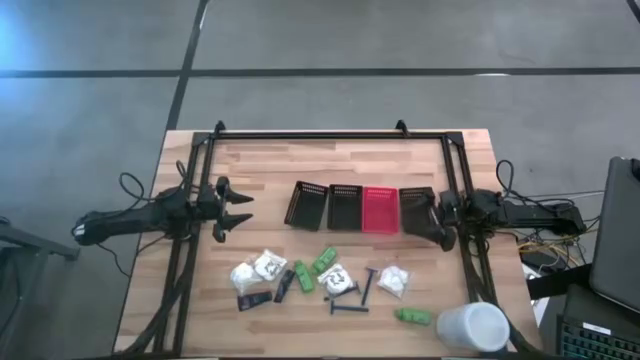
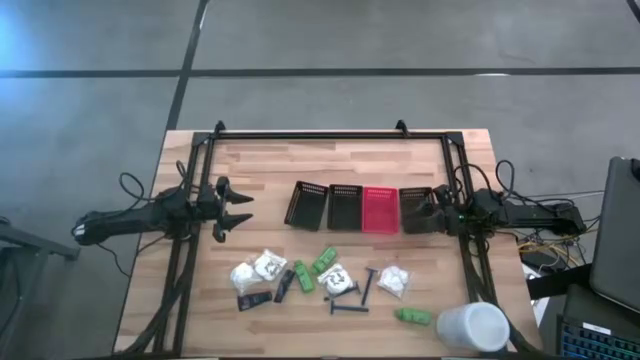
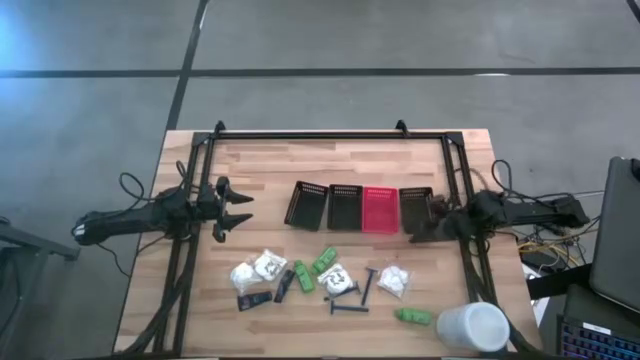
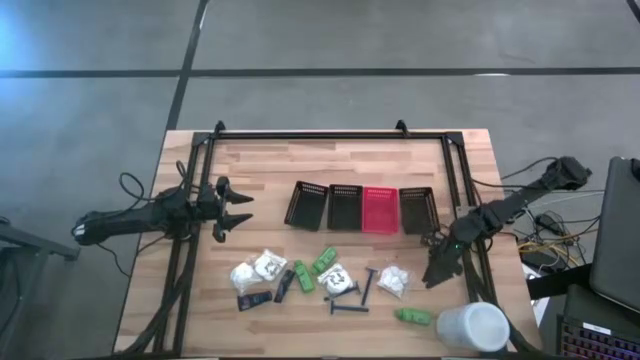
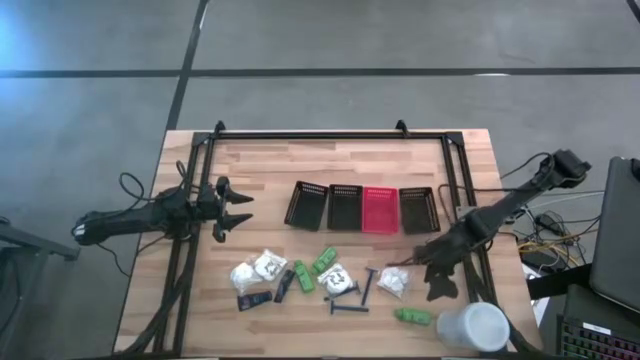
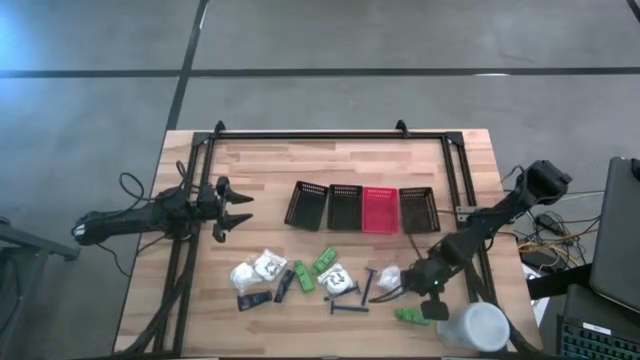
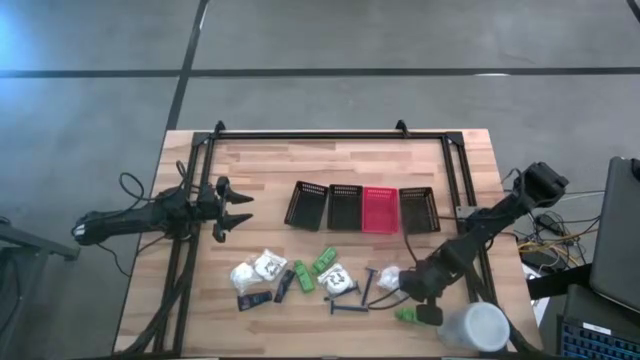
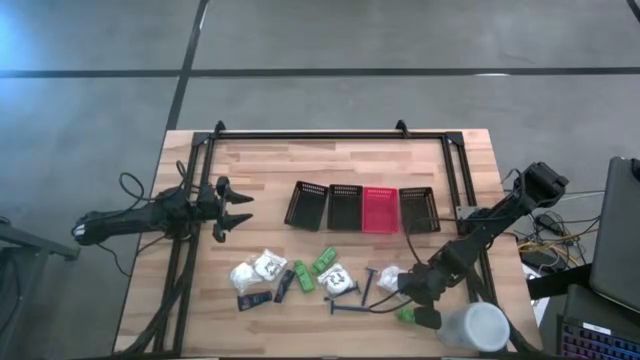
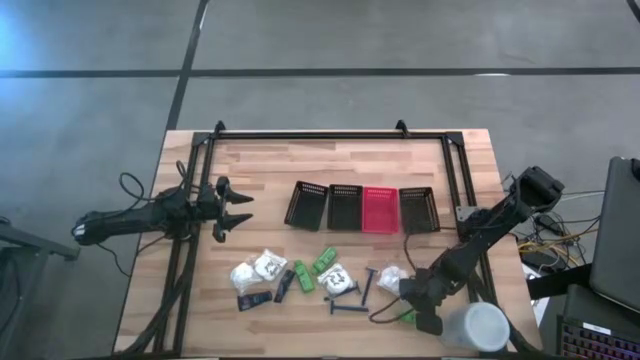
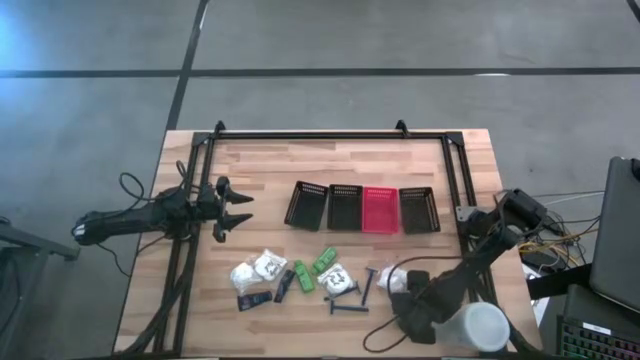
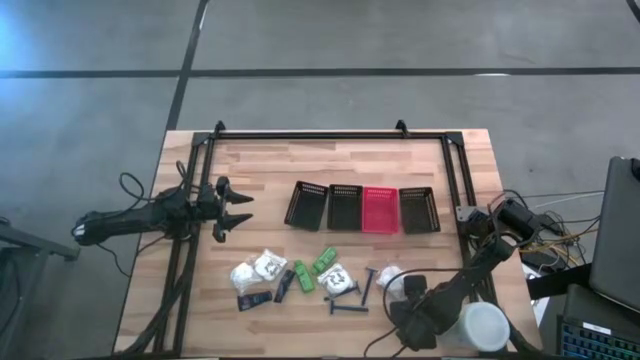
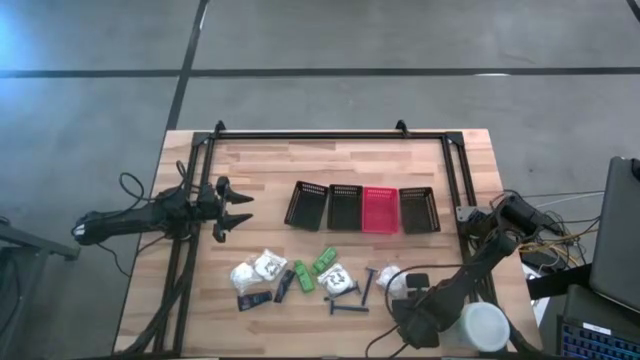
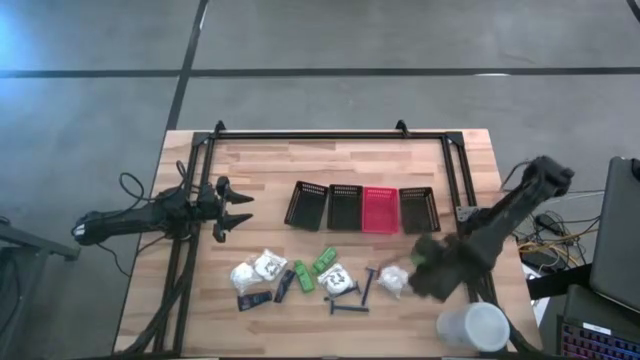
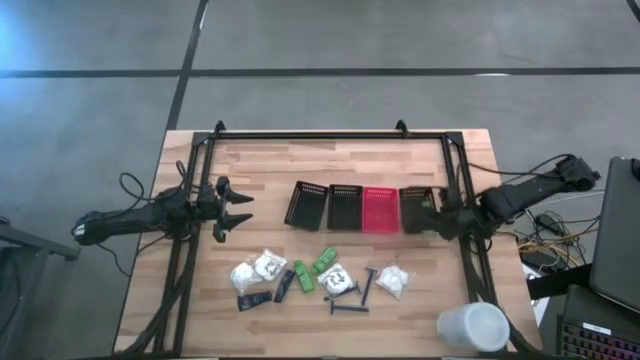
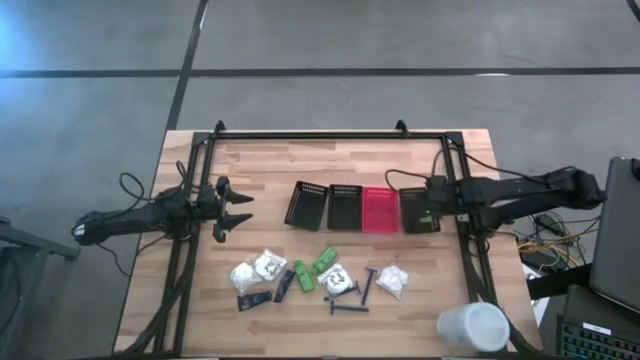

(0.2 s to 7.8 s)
Task: Pick & Place Travel size toiletries
Put the green shampoo into the right black bin

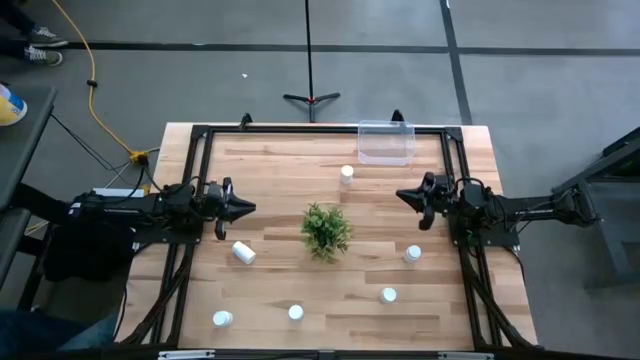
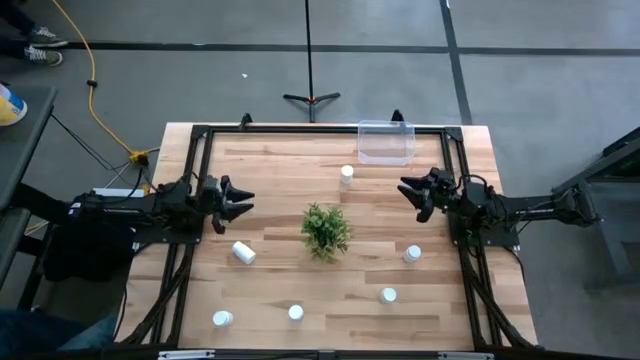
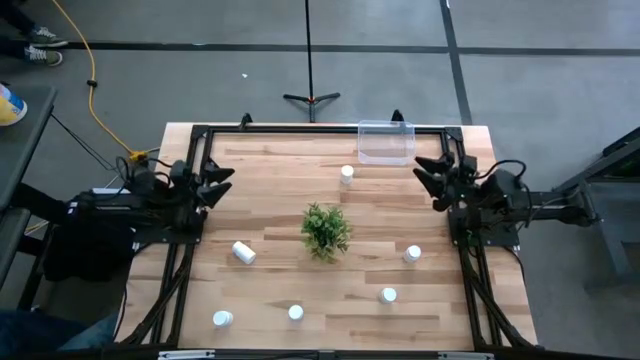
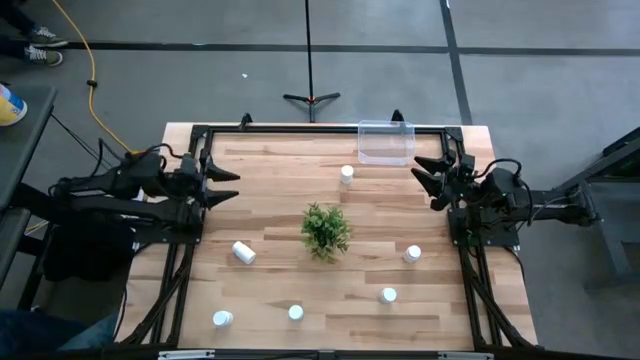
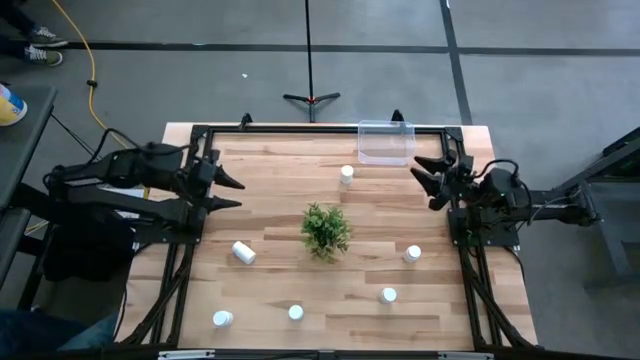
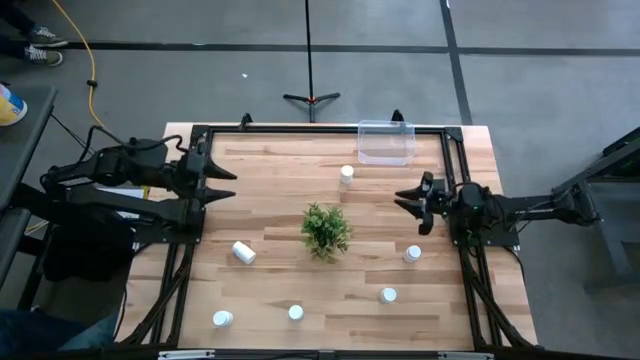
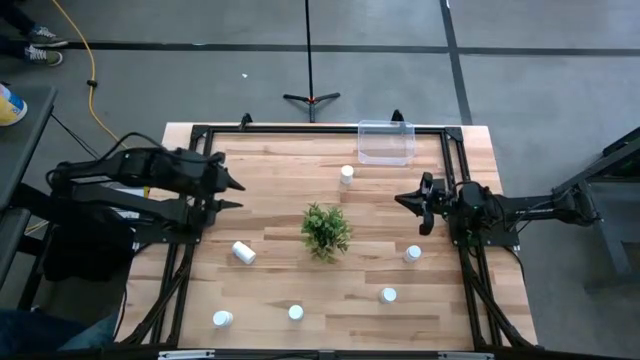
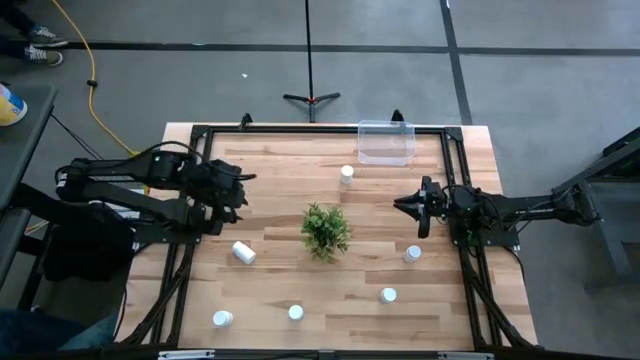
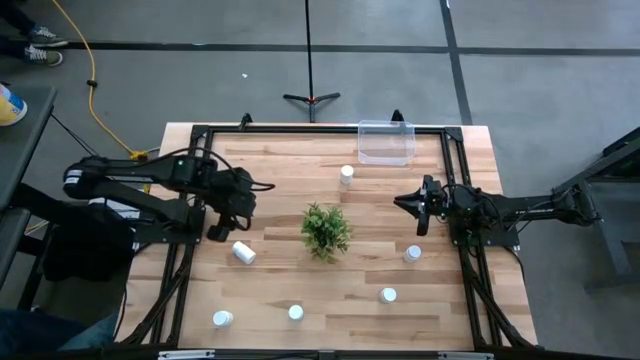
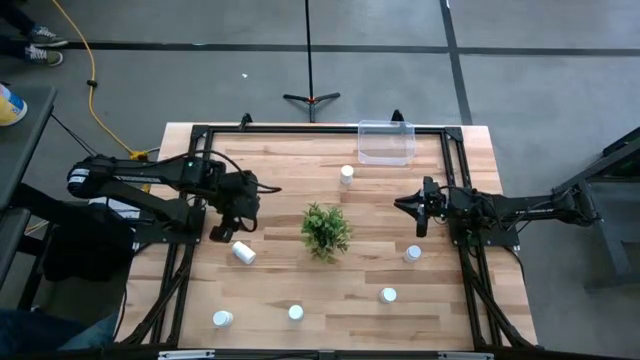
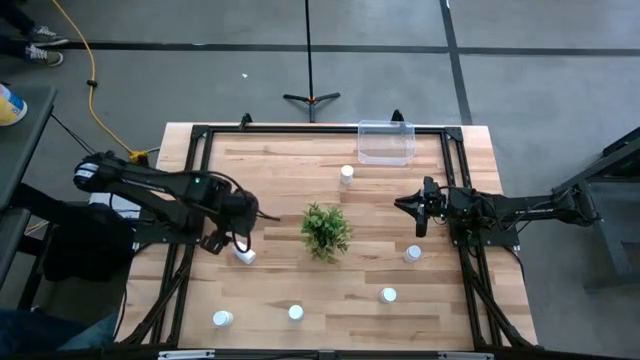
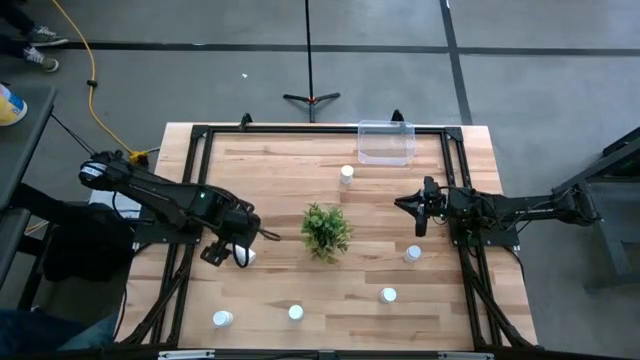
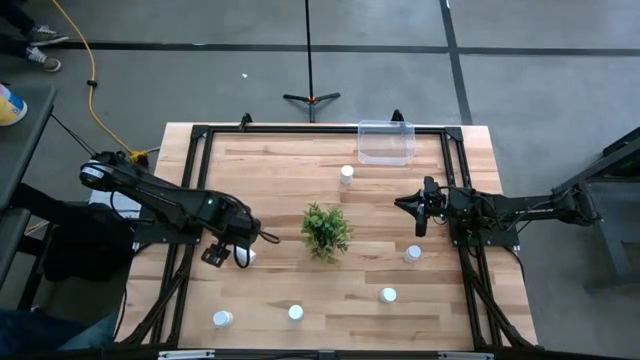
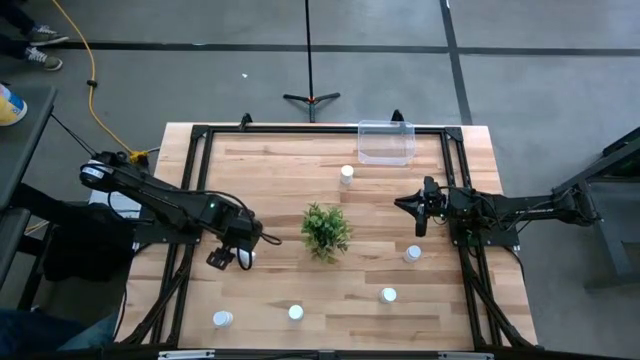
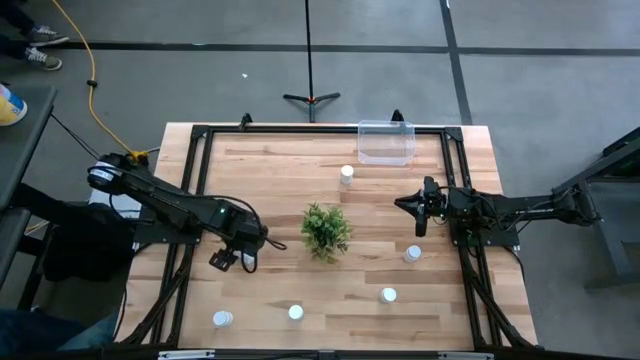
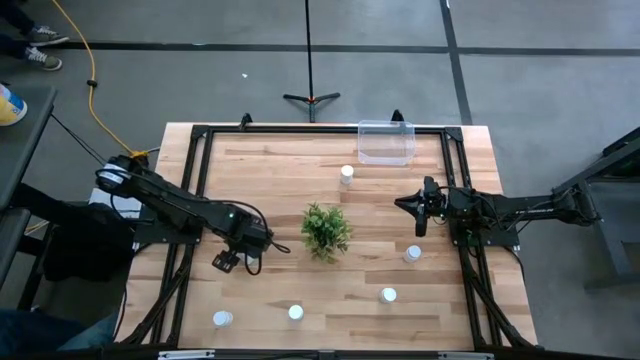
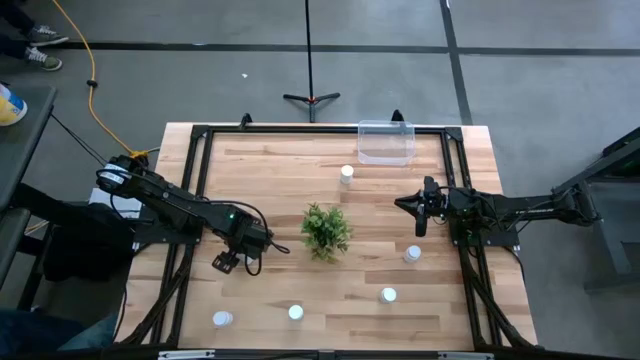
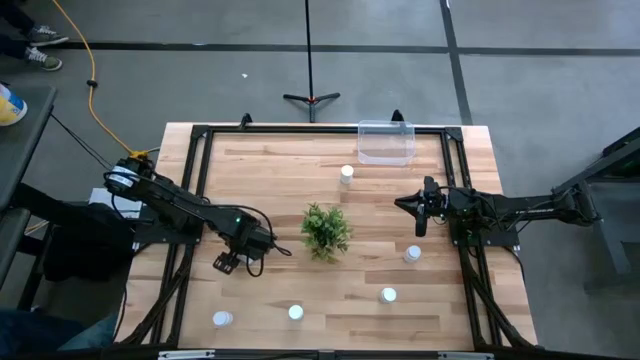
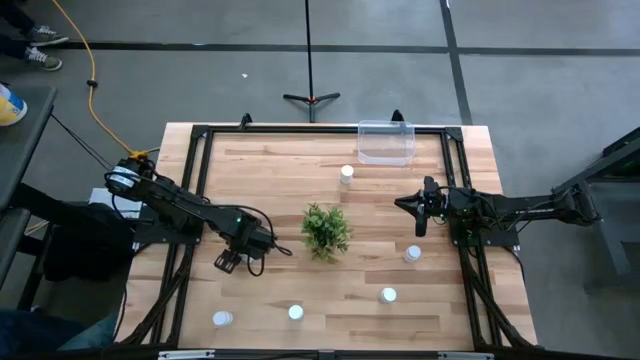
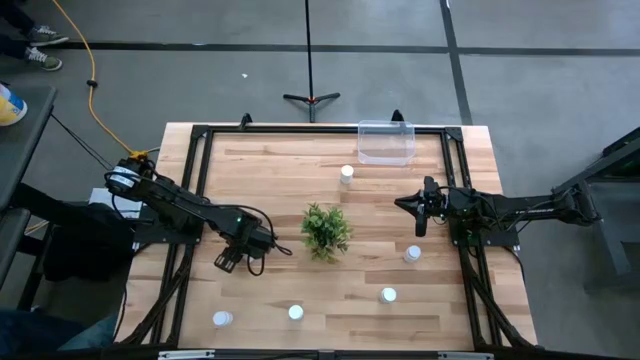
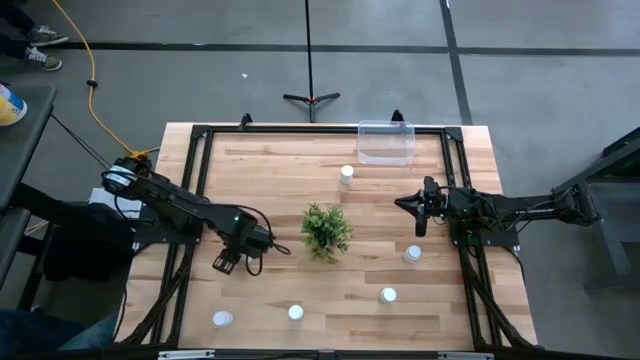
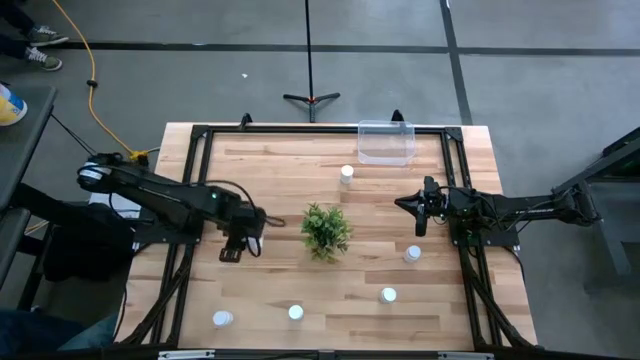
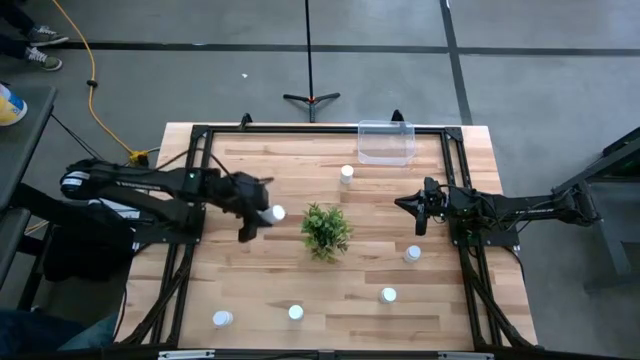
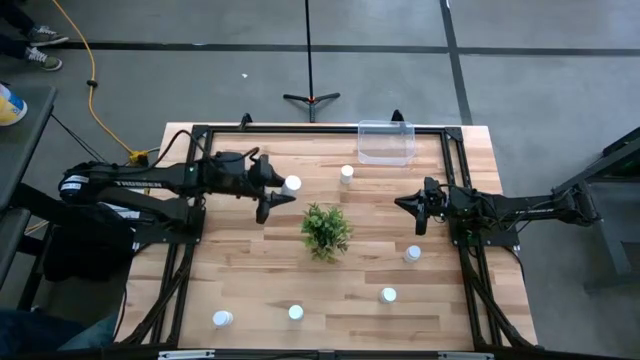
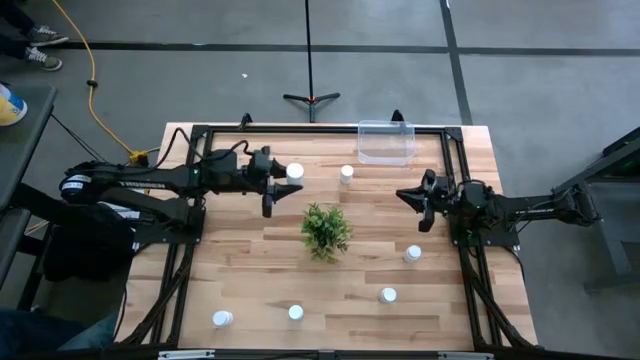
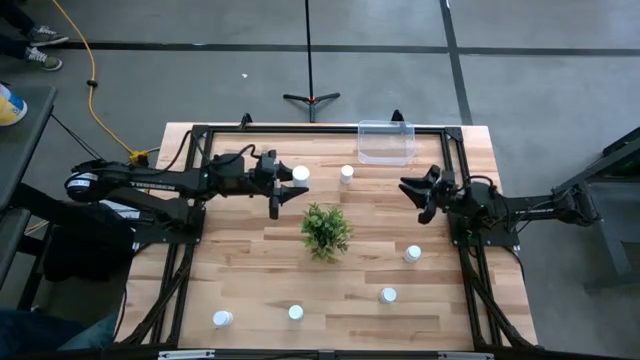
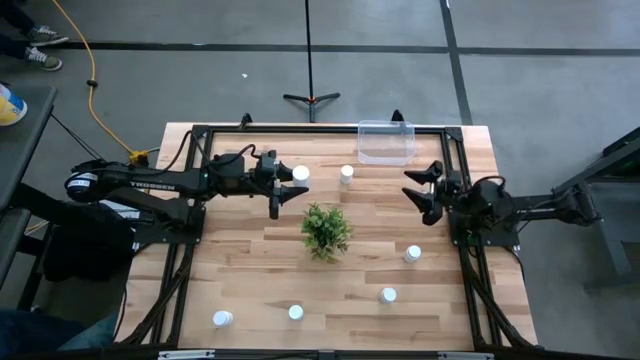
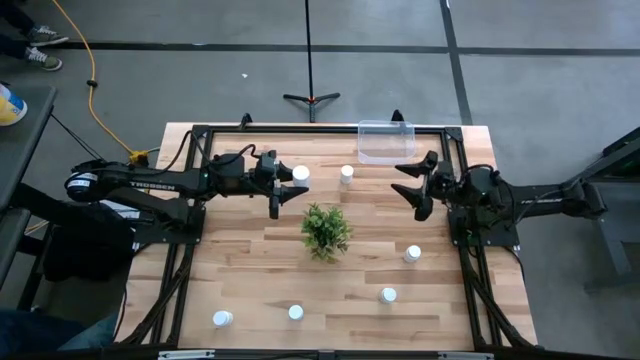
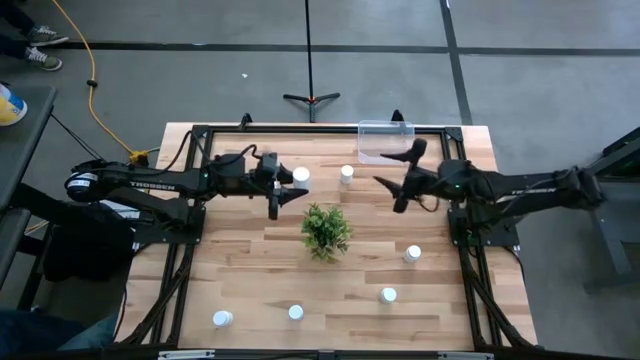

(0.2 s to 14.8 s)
Task: Pick and place pill bottles into a basket
Put the white pill bottle into the transparent bin
